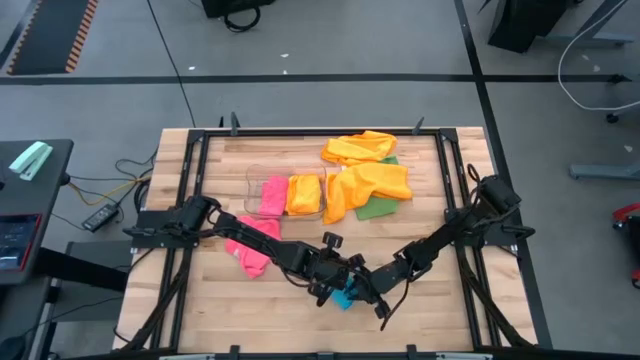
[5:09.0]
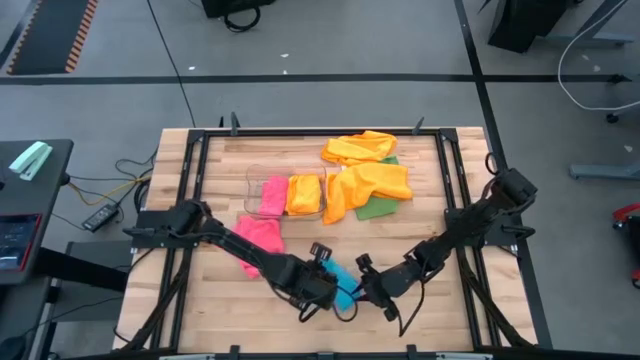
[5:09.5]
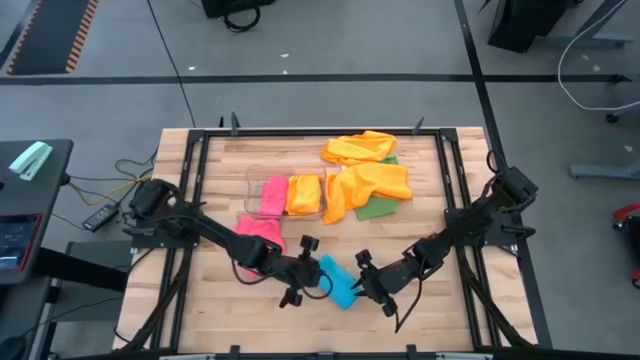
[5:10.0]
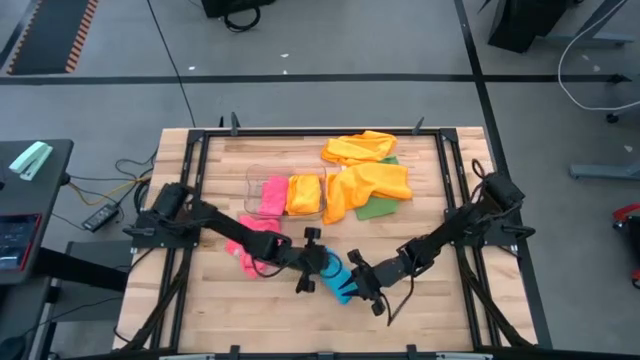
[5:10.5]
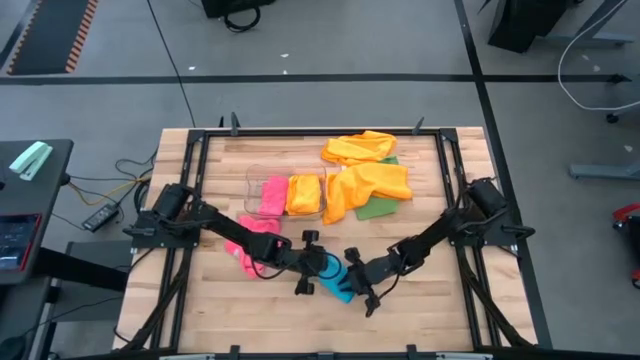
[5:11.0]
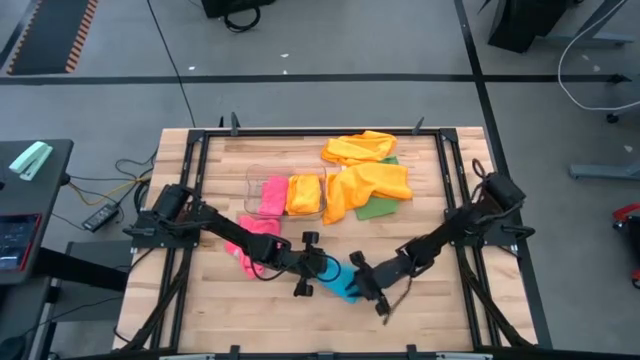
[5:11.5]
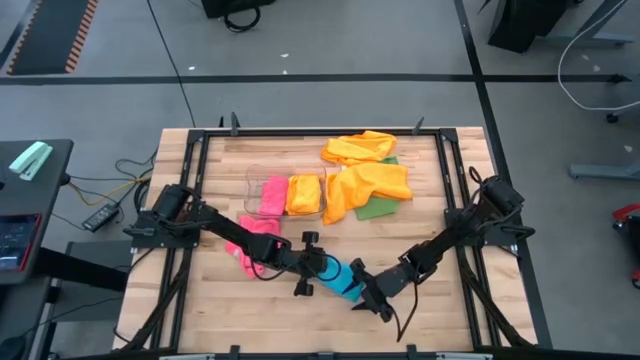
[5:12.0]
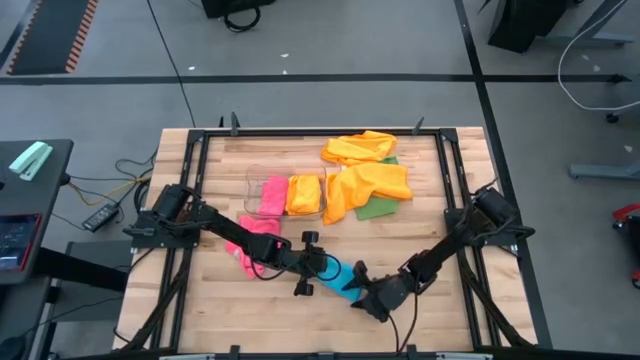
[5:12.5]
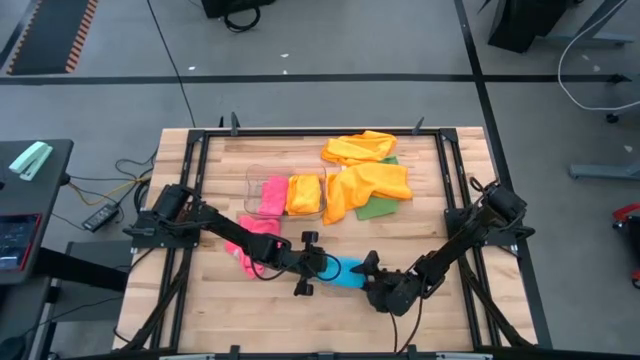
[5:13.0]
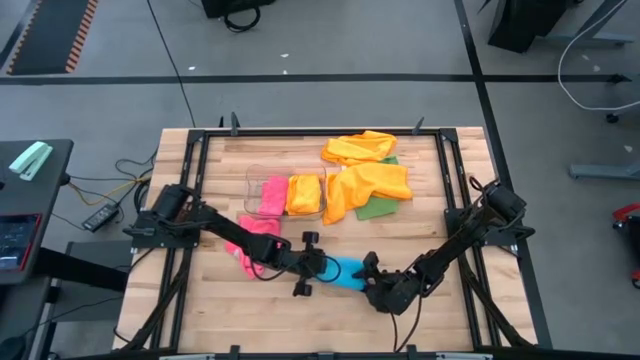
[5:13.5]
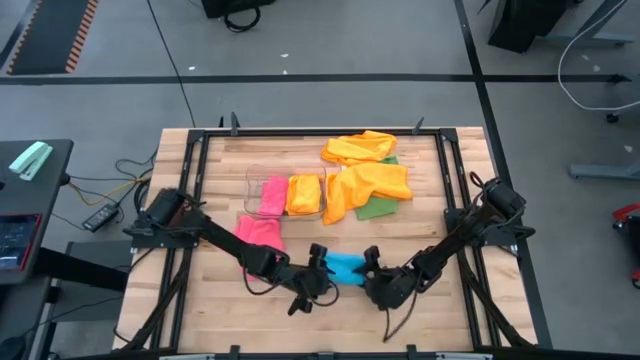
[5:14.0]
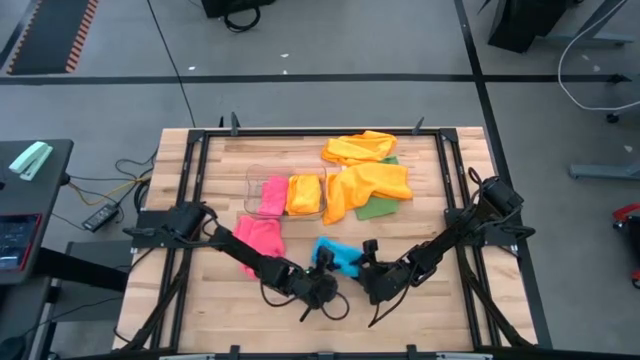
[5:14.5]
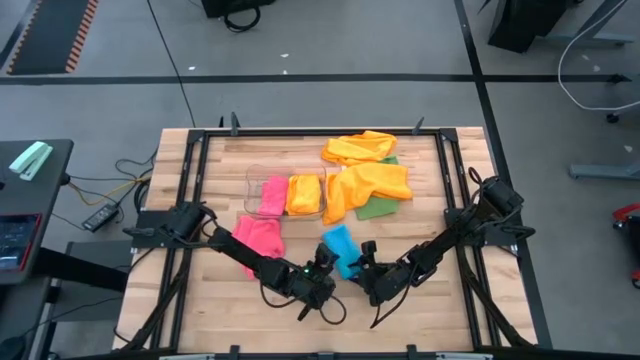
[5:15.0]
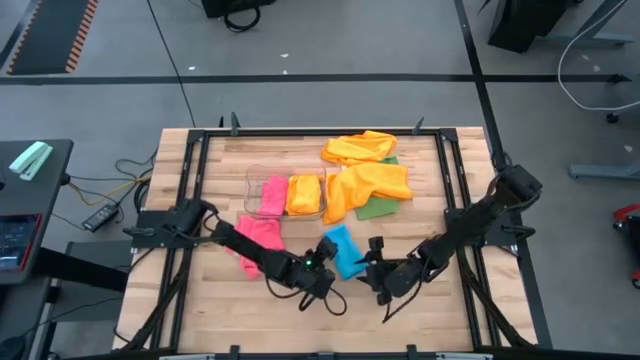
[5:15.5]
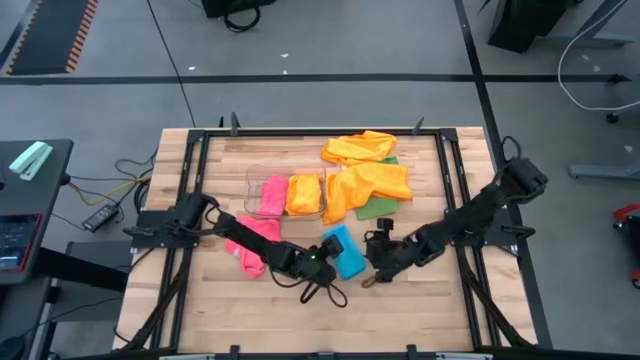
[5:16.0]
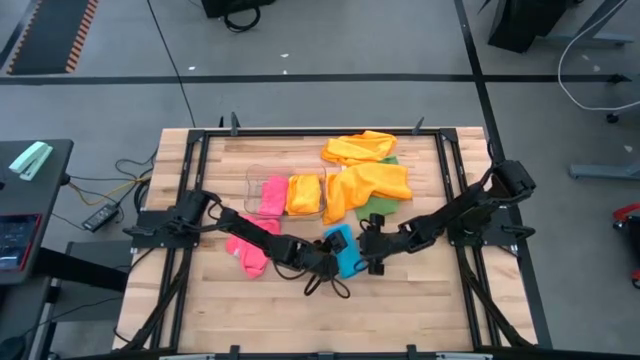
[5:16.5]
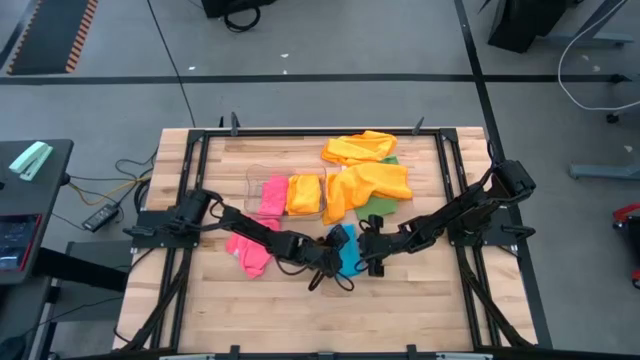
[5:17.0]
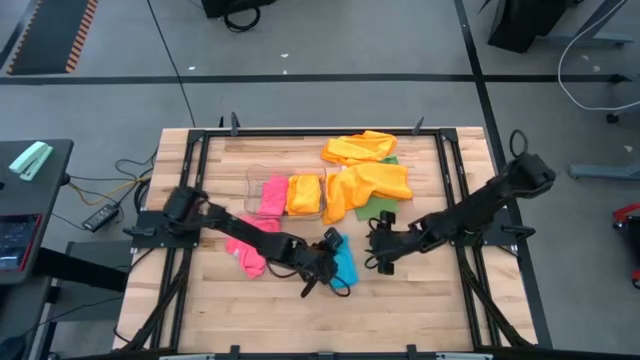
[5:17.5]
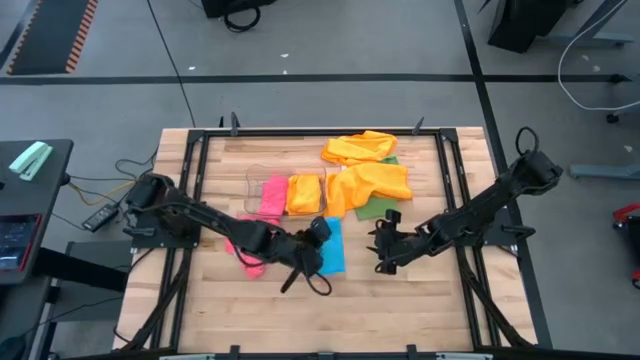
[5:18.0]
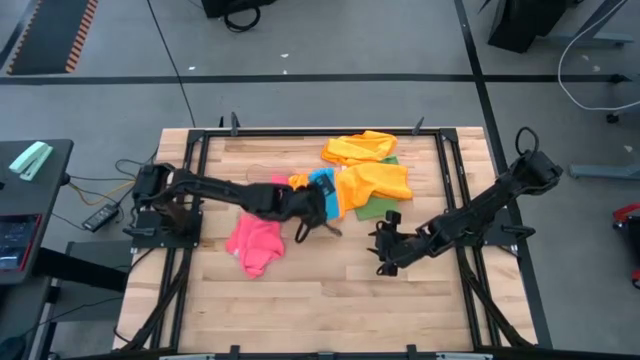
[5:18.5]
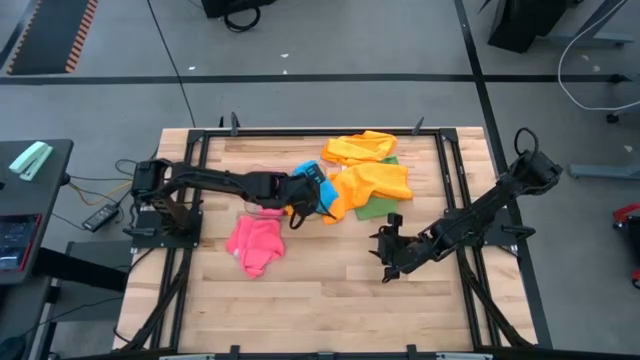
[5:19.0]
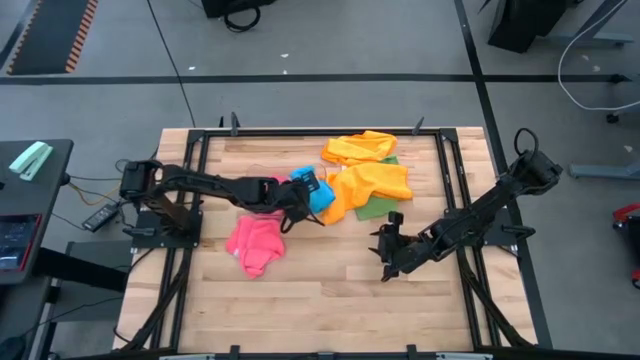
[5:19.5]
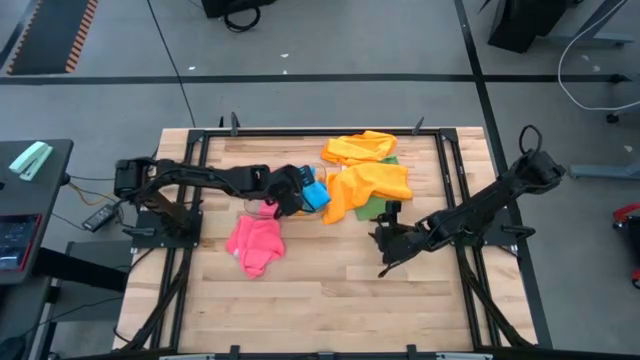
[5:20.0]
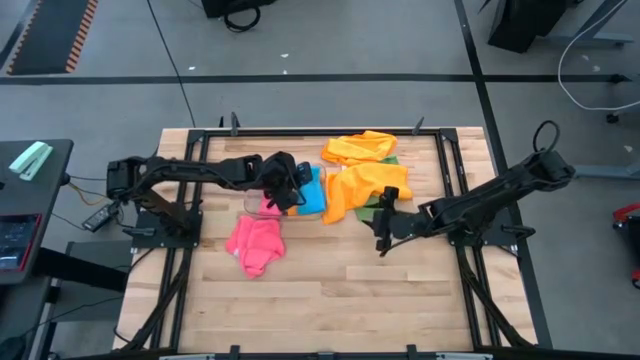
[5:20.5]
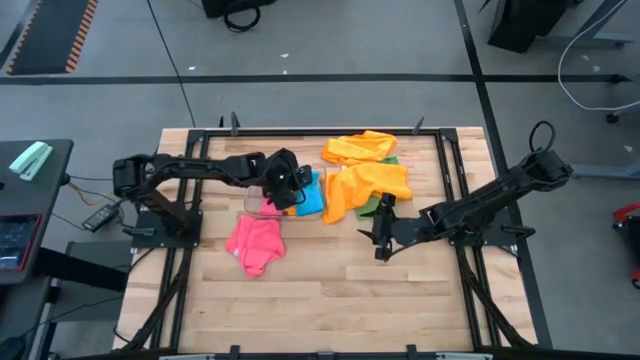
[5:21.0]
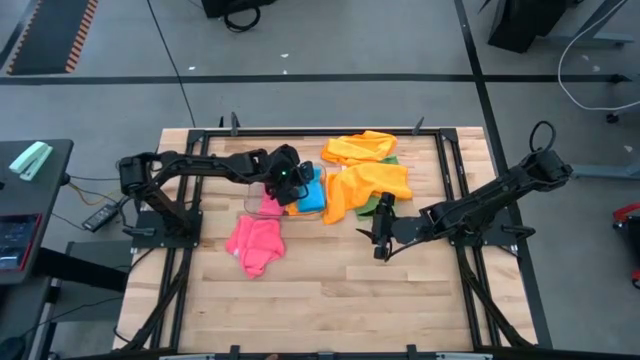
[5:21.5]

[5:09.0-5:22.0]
Task: Fold microfiber towels
Put the folded blue microfiber cloth into the transparent bin
